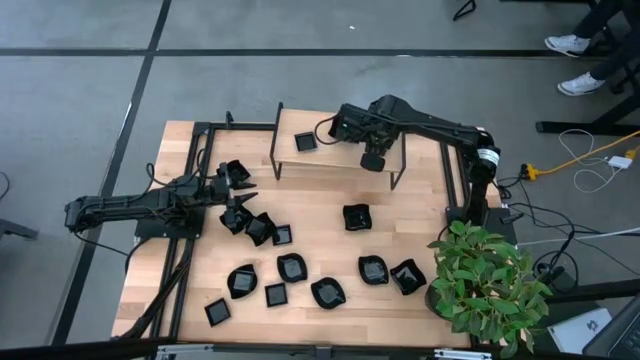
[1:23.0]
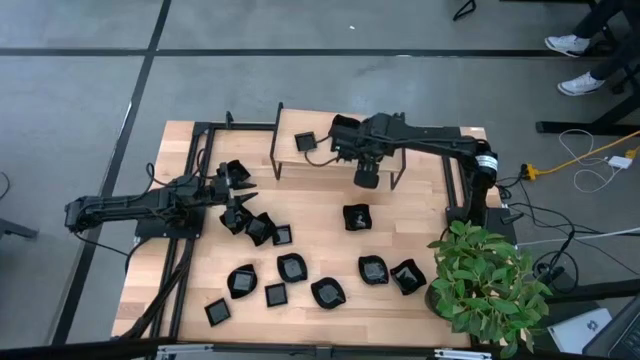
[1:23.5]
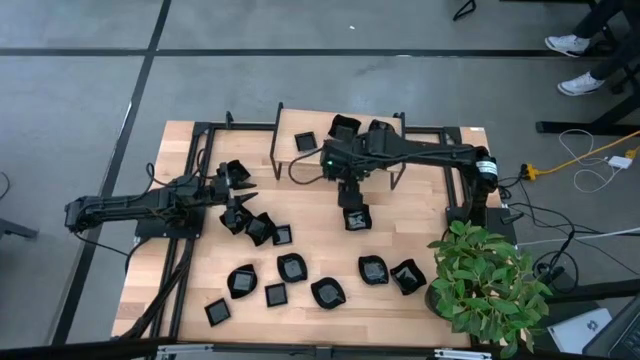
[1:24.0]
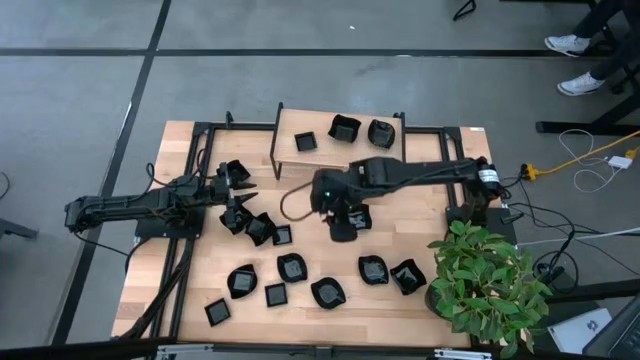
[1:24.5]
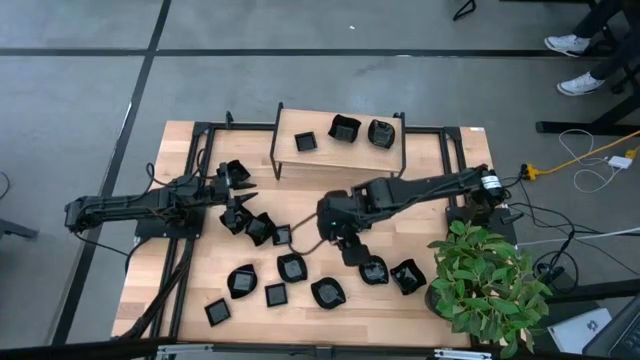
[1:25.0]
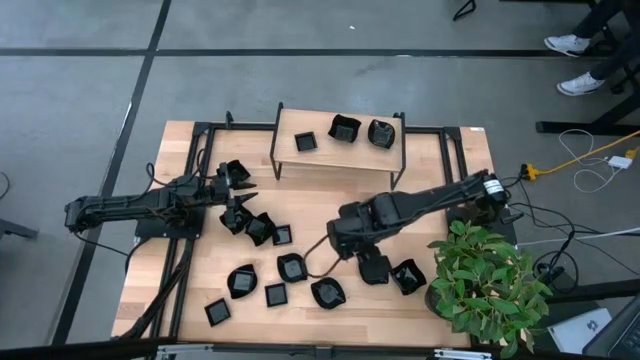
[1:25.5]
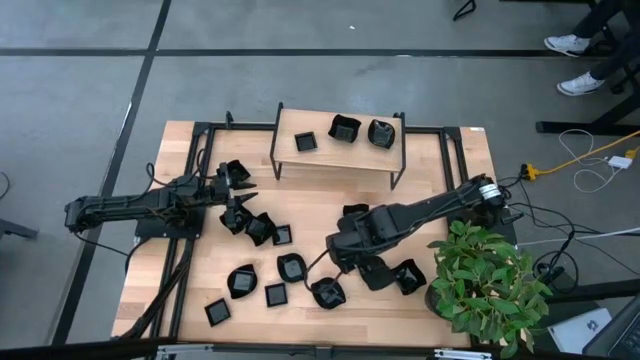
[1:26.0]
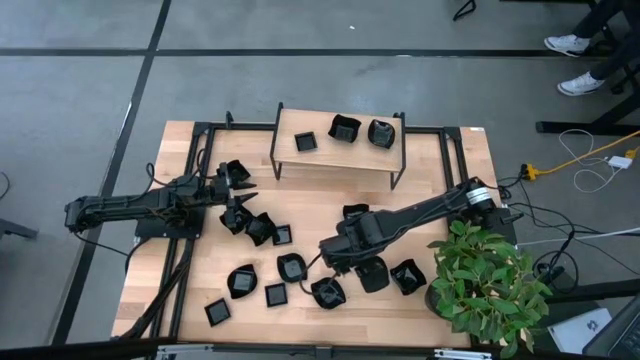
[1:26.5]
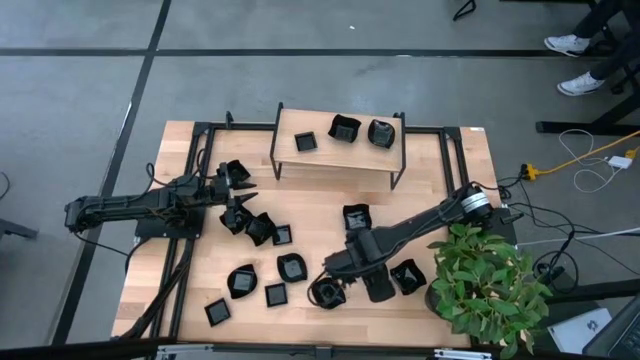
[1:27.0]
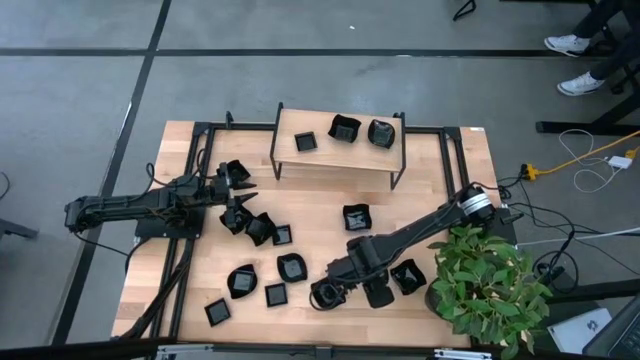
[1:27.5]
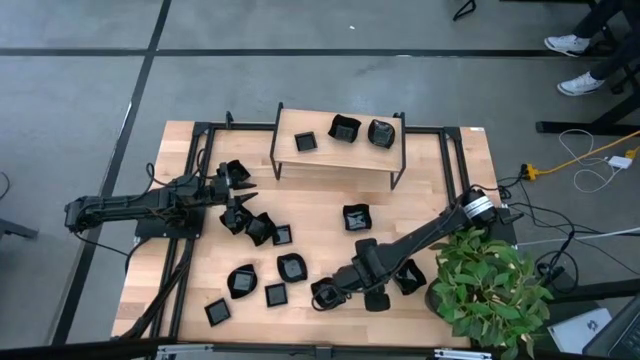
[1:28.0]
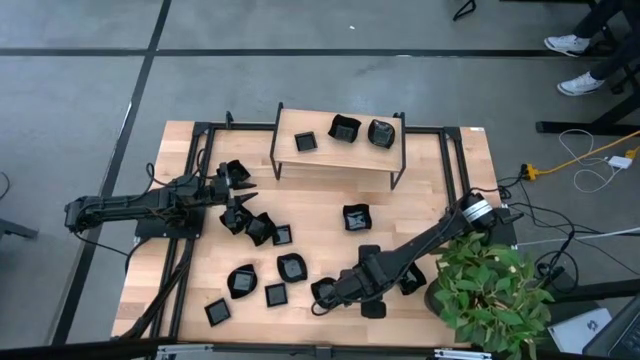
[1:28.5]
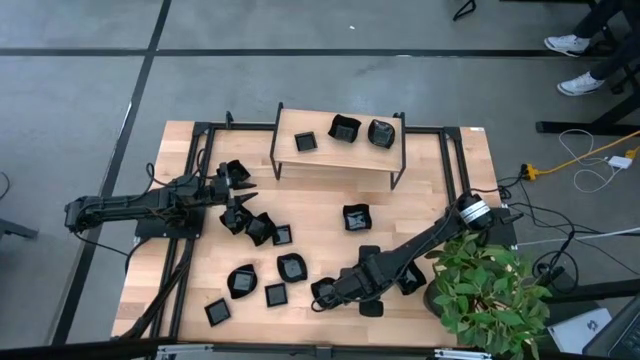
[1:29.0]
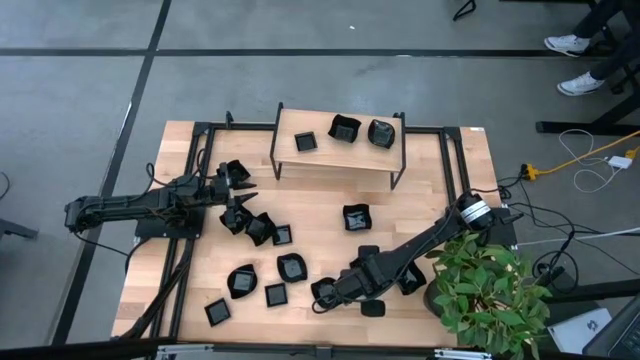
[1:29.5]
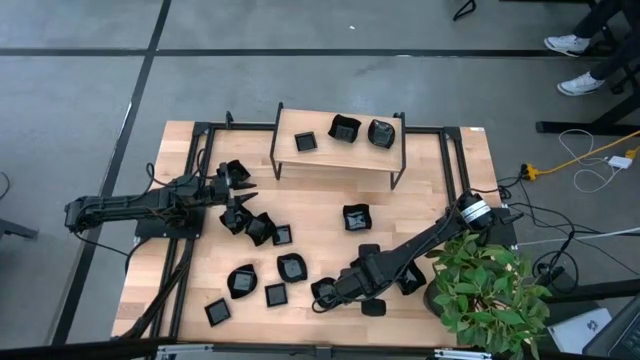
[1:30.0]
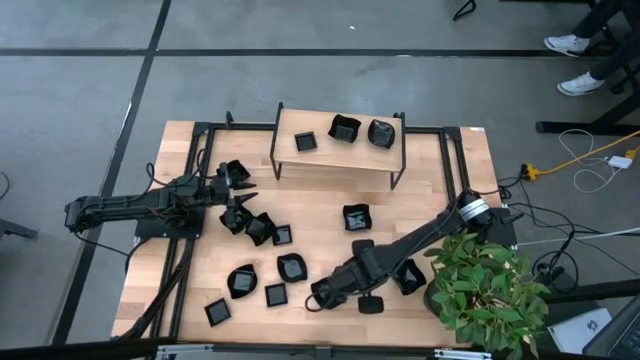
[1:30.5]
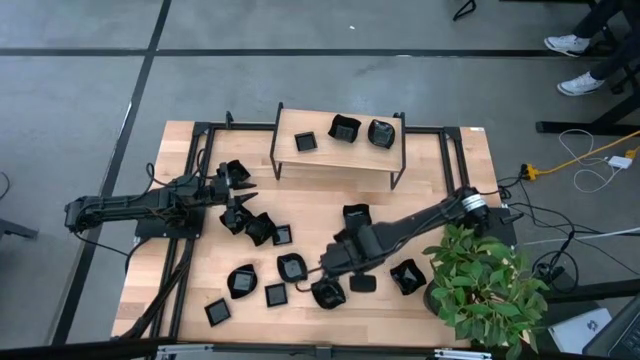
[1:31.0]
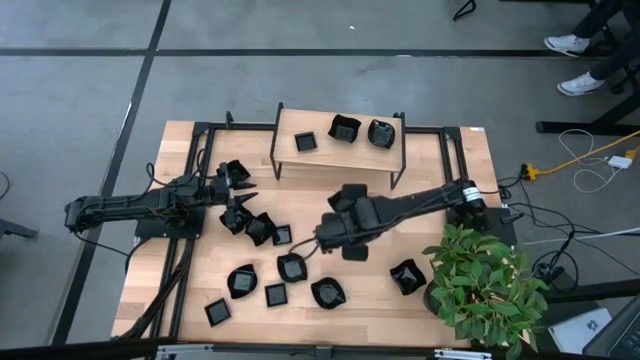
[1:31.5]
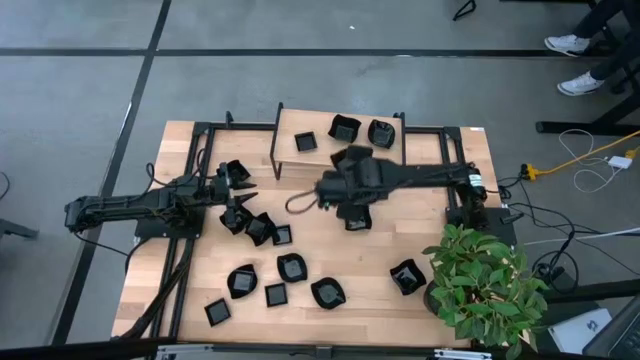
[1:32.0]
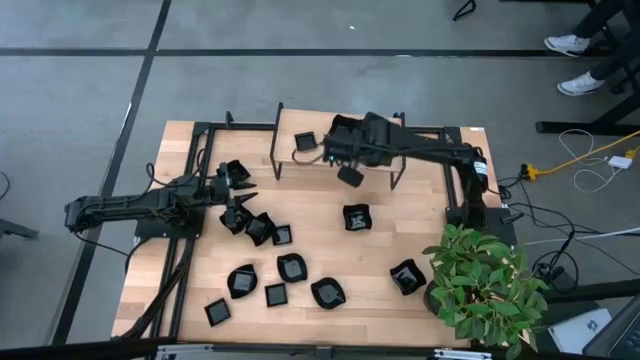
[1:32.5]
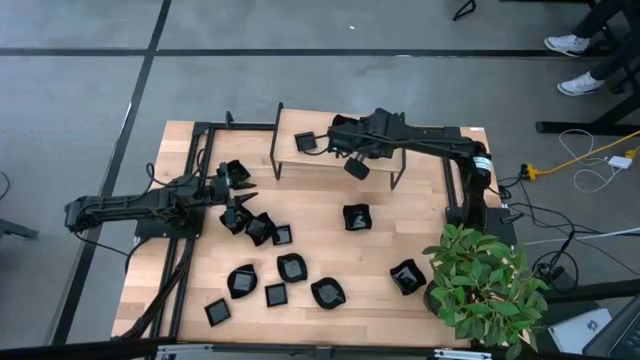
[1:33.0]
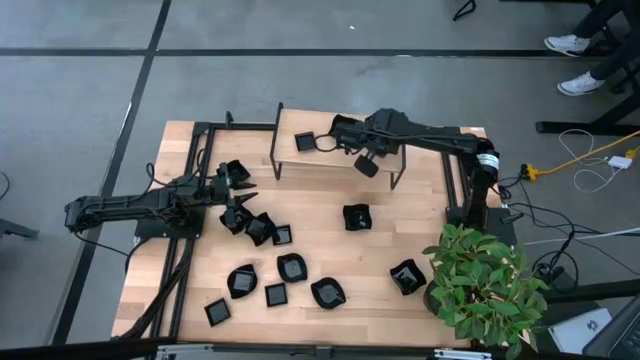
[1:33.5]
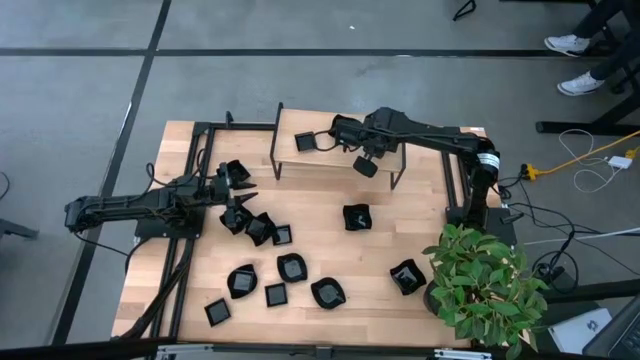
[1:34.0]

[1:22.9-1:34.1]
Task: Pick & Place Mini shaped plates
Stack the leaf-shaped plate on top of the leaf-shaped plate on the shelf

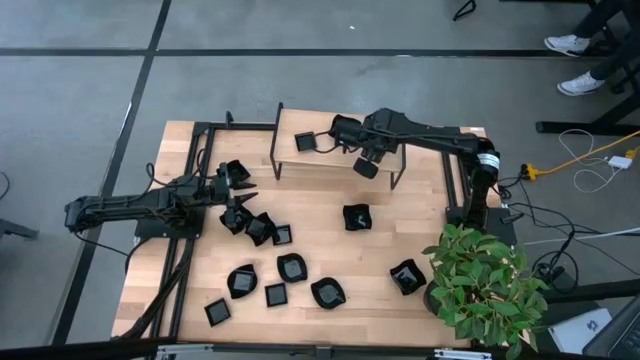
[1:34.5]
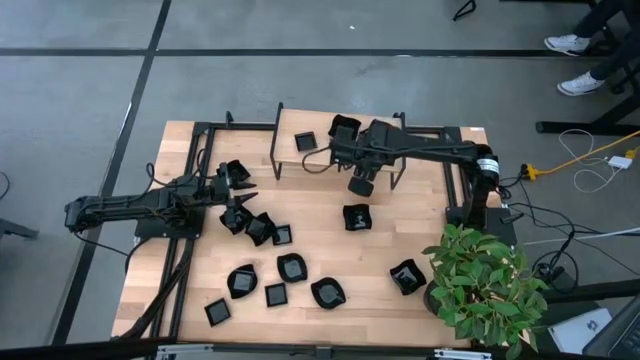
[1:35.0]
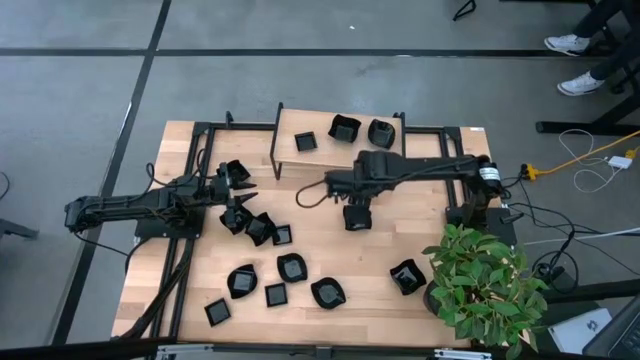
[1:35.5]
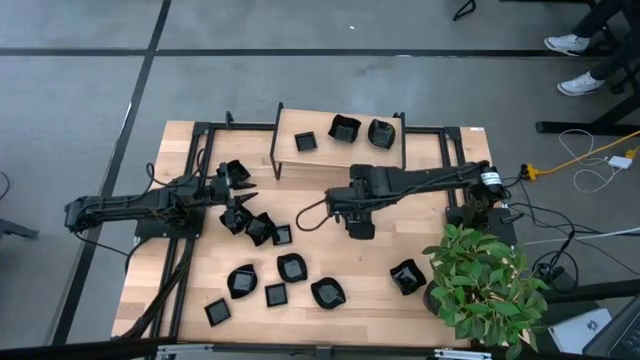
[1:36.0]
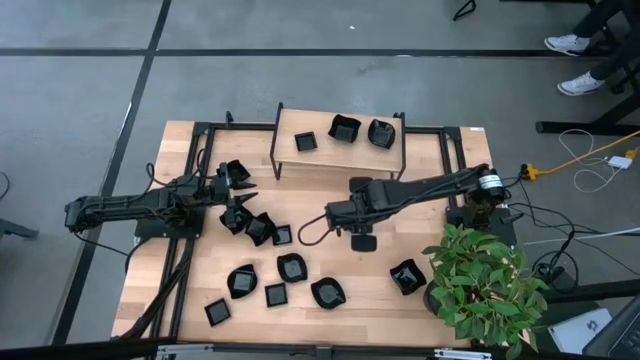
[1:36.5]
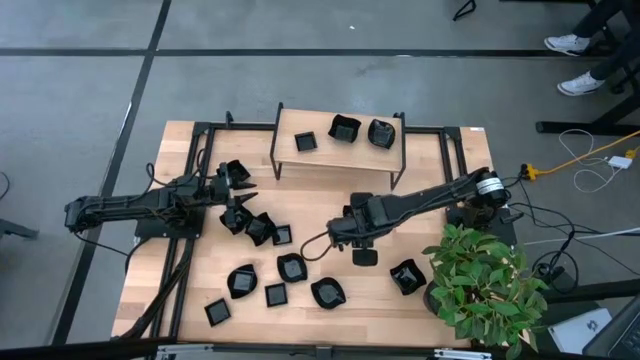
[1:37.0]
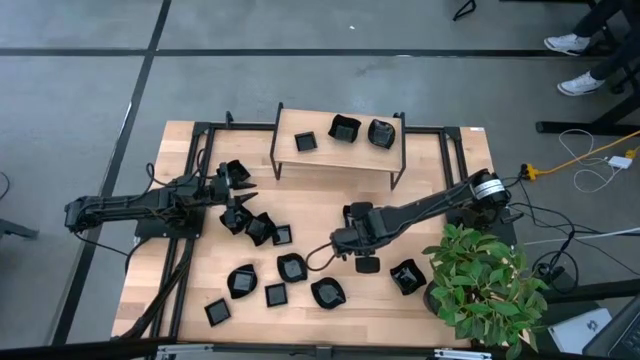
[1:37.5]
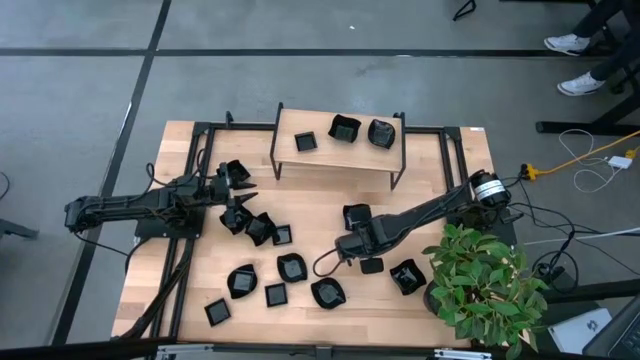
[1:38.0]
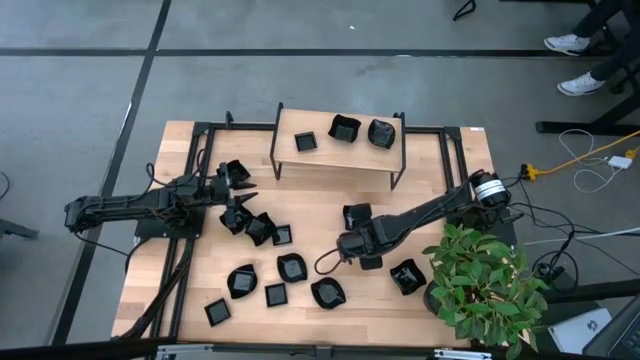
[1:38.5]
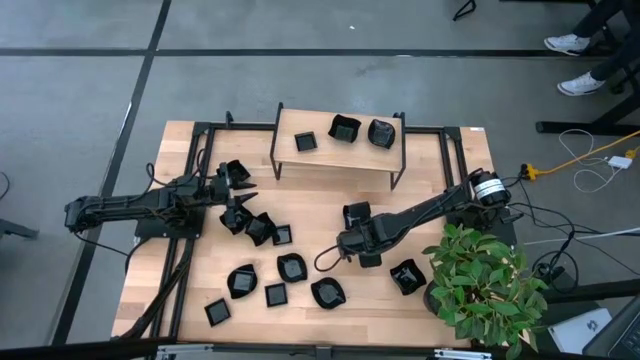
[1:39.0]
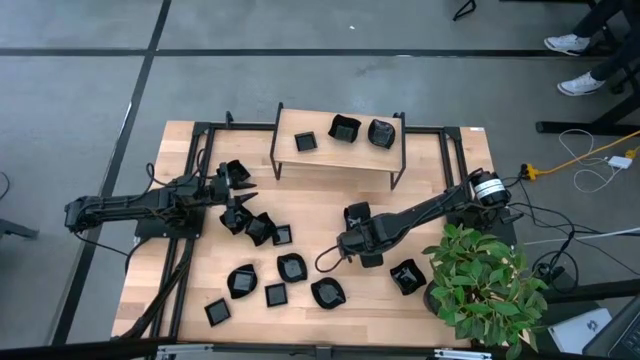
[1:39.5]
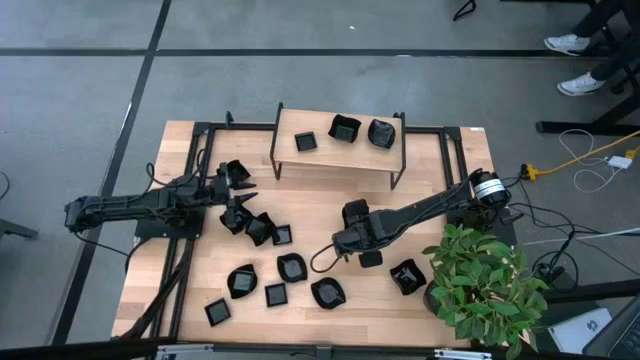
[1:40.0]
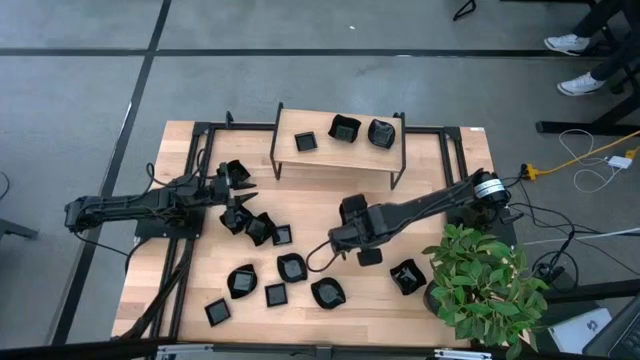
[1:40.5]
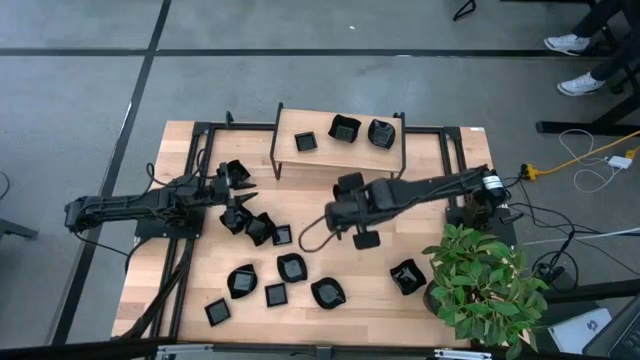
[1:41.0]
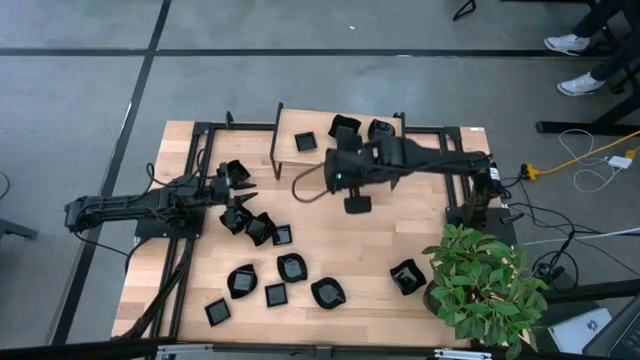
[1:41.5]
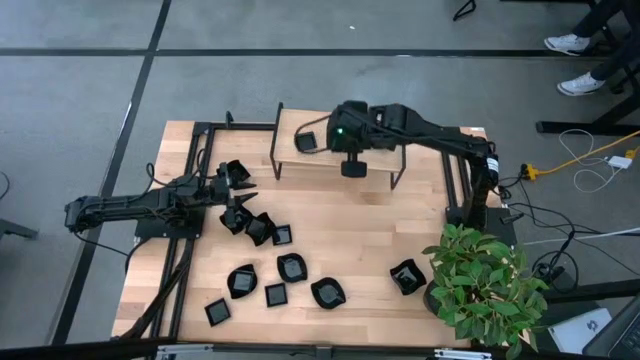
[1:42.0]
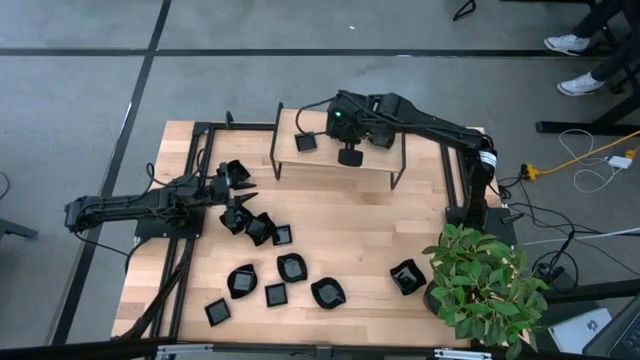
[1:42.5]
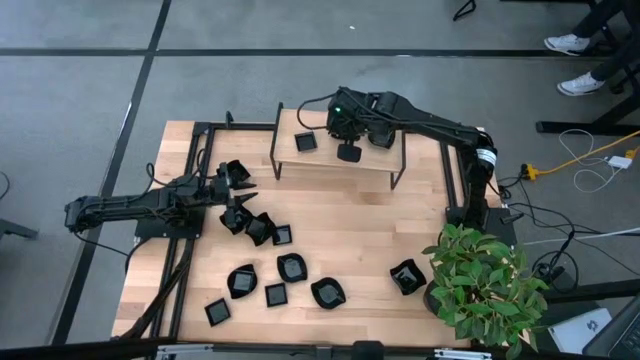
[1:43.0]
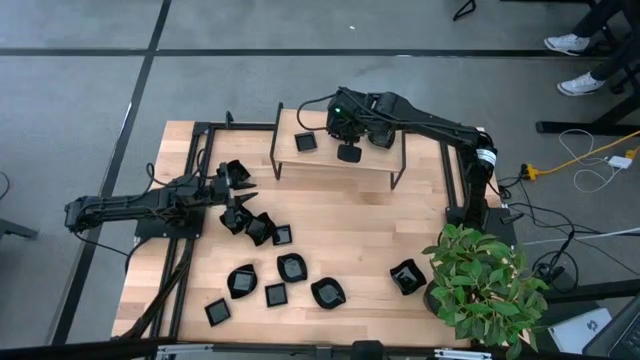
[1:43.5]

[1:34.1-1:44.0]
Stack the distorted square plate on top of the distorted square plate on the shelf
